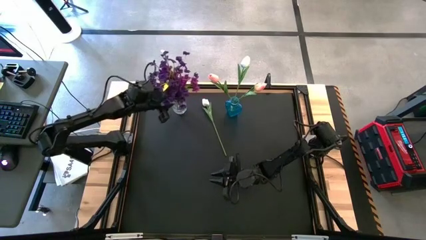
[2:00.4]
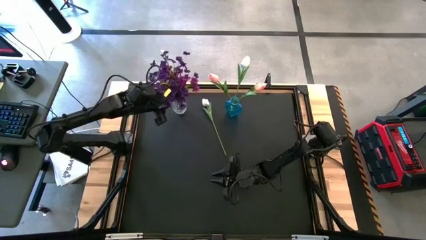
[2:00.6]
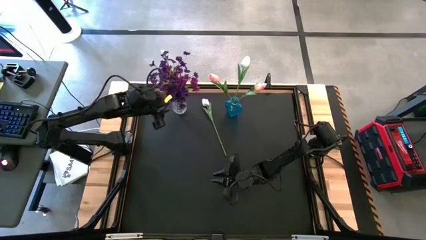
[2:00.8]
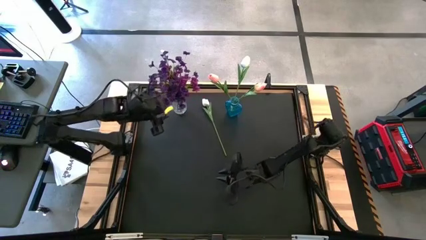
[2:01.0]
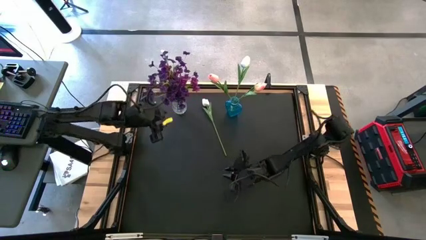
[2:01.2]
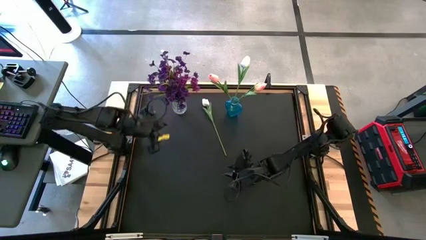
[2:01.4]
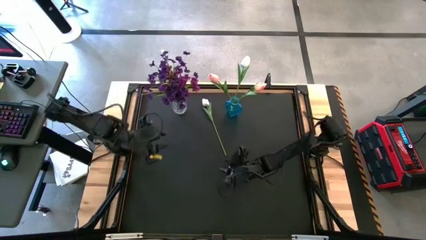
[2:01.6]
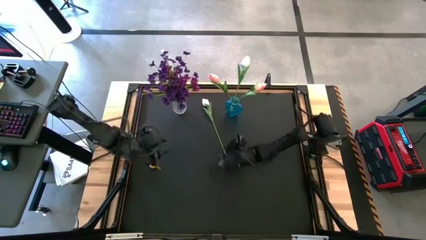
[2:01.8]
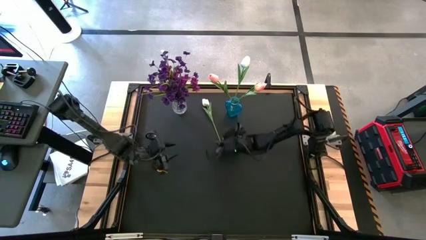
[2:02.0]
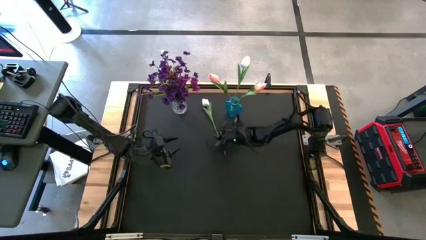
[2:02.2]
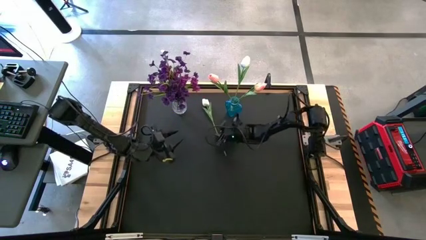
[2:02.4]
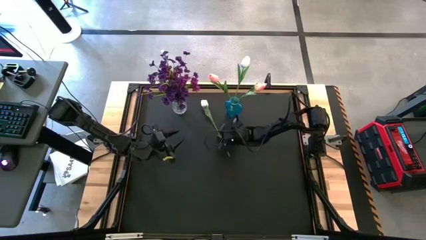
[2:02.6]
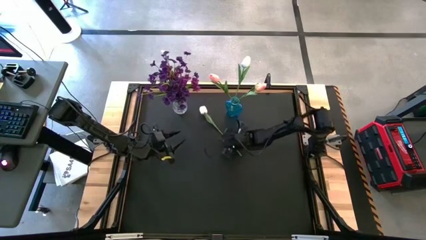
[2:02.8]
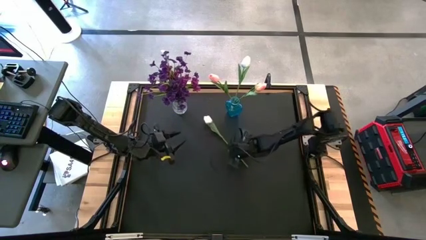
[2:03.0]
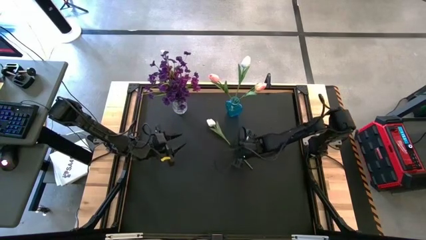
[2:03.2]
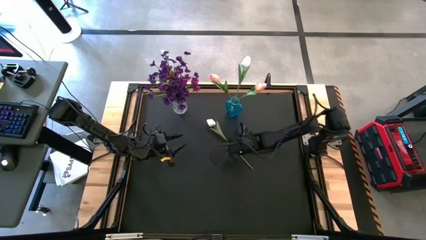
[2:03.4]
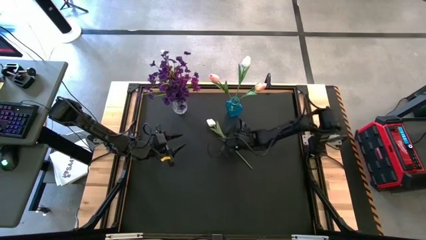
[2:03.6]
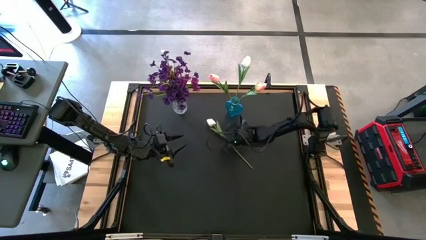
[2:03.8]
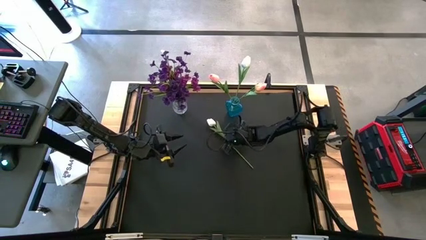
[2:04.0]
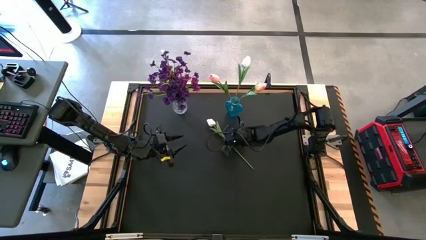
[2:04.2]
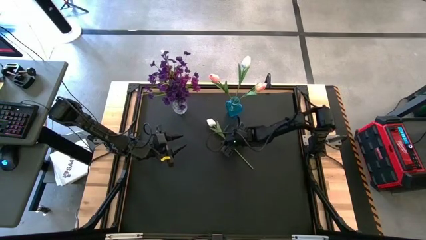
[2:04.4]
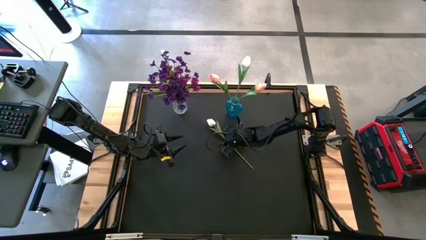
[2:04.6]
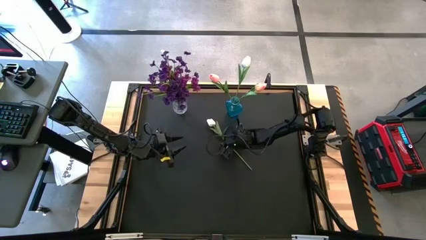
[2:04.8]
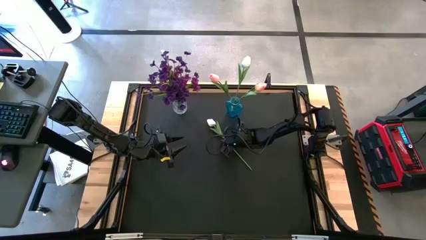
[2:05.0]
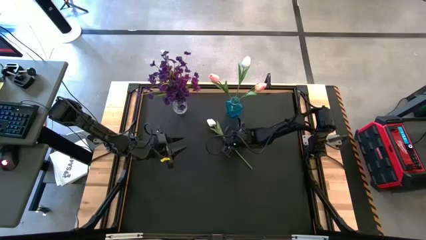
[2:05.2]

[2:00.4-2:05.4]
Task: Sort flowers into vase by color
Put the white flower into the blue vase

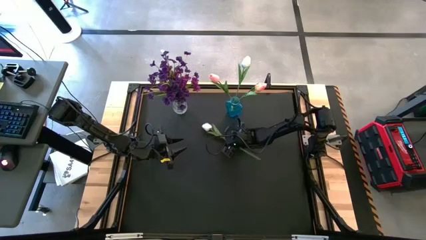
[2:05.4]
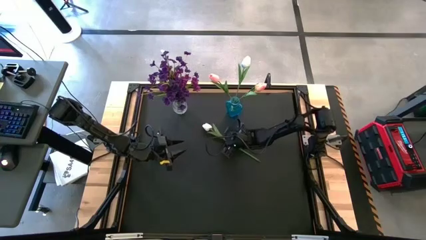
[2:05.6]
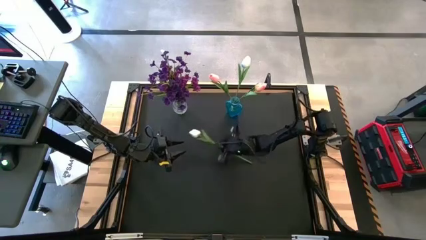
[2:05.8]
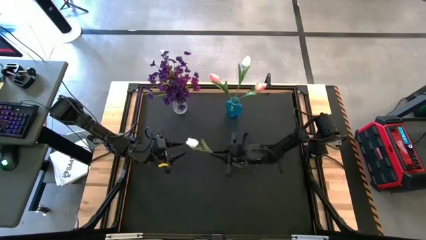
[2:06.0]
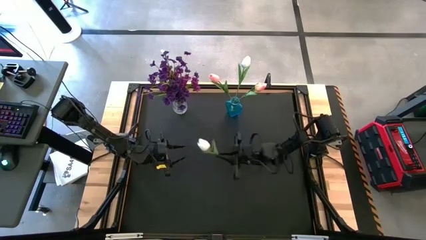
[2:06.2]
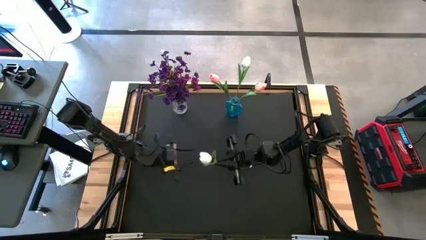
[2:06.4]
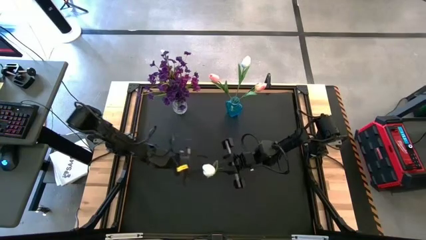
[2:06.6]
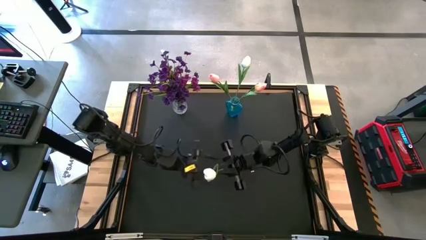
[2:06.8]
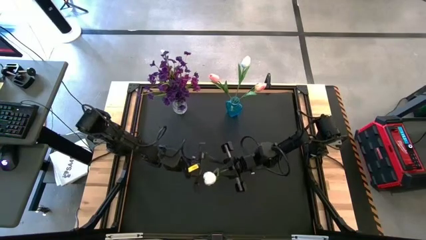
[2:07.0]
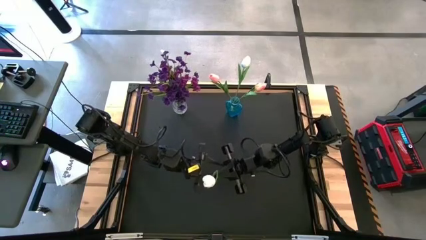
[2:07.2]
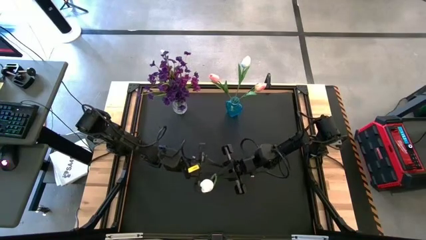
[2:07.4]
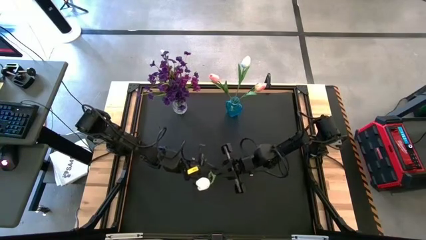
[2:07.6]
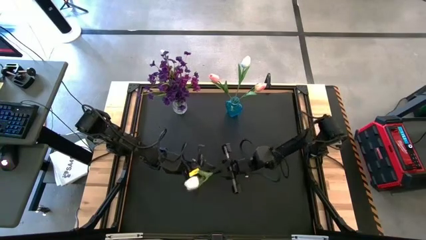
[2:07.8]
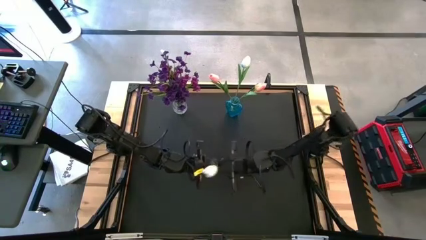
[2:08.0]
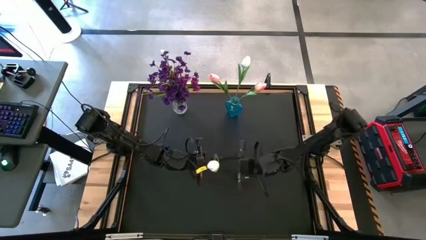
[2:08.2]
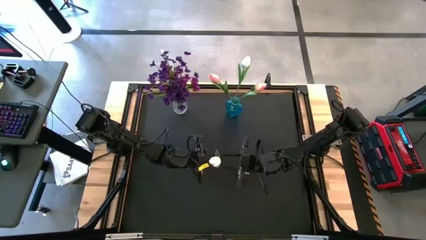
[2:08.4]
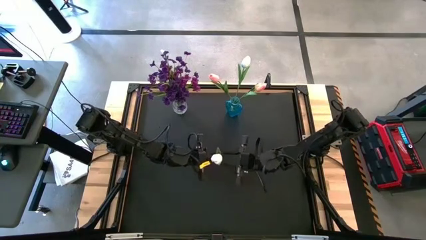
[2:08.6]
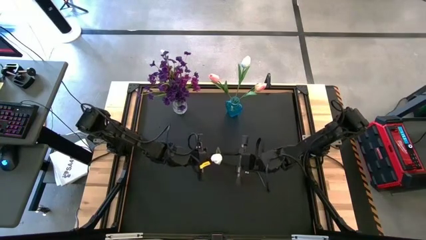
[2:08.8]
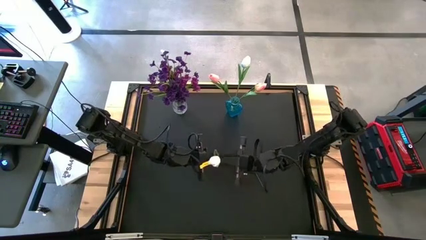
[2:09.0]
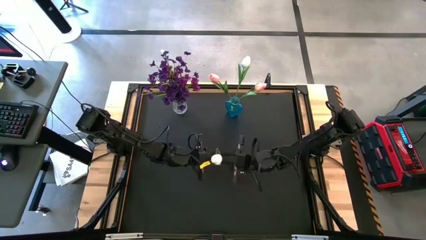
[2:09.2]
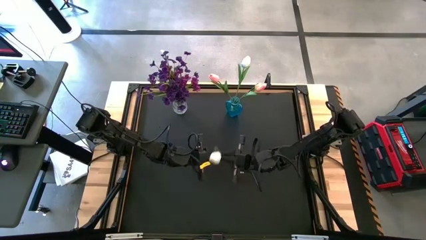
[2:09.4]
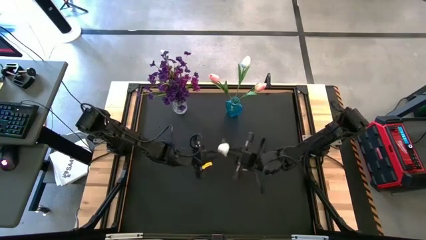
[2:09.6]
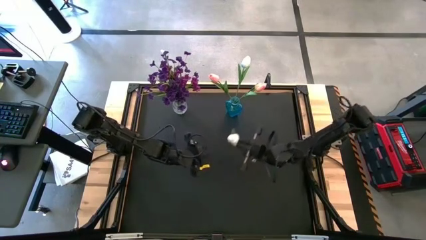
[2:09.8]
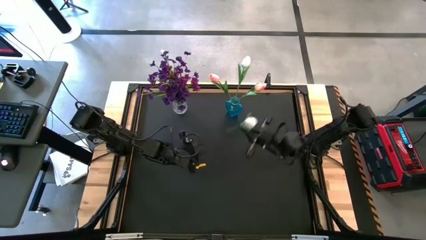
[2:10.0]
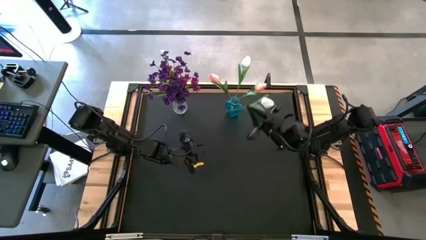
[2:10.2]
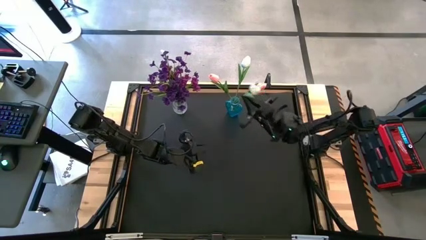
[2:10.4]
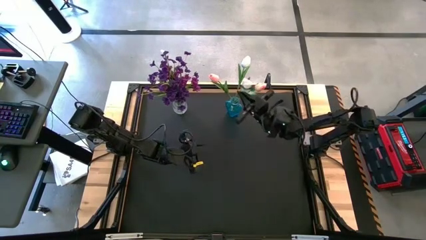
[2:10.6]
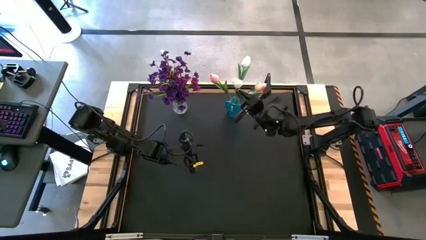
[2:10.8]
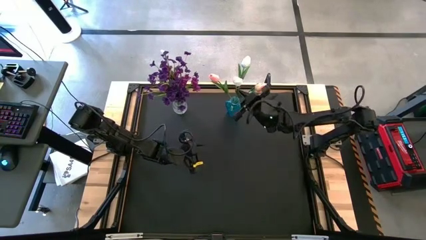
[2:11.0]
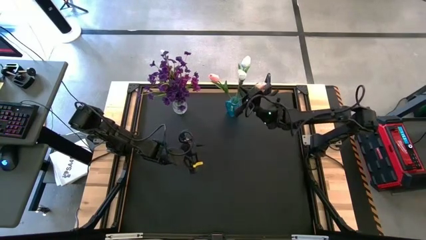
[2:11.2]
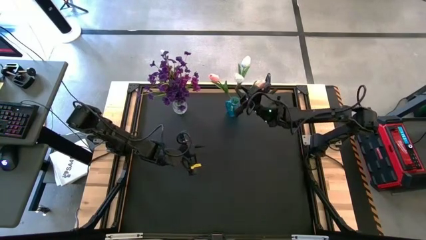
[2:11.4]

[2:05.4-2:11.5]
Put the white flower into the blue vase

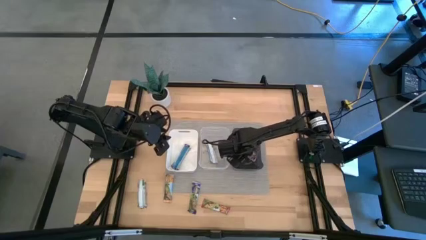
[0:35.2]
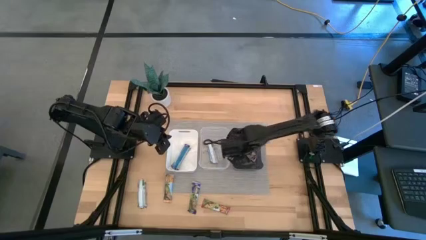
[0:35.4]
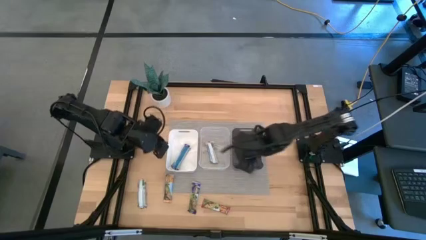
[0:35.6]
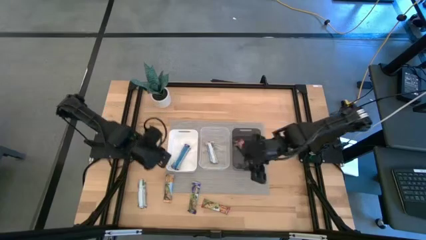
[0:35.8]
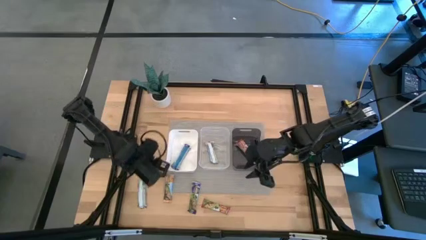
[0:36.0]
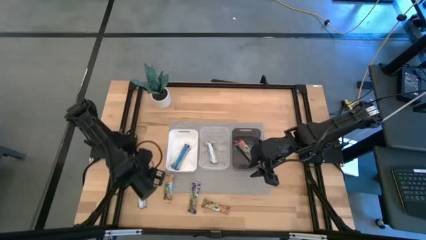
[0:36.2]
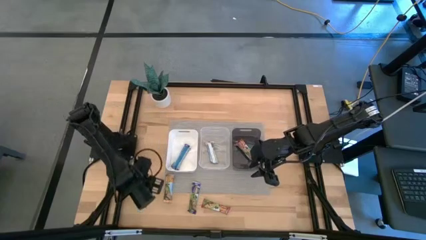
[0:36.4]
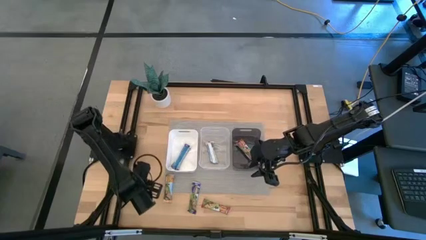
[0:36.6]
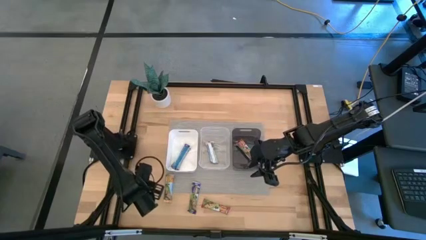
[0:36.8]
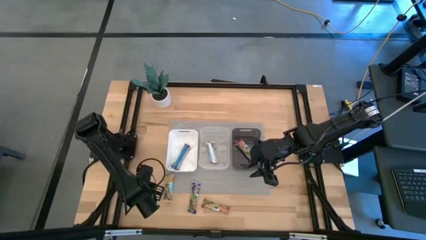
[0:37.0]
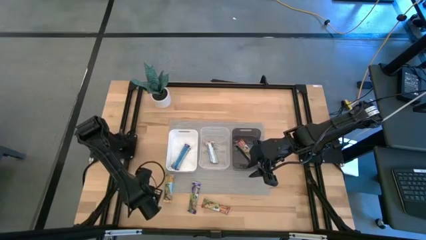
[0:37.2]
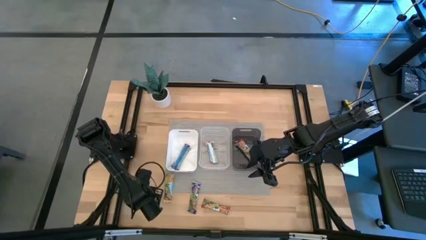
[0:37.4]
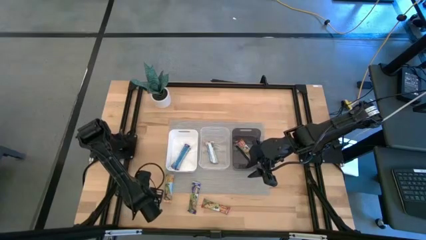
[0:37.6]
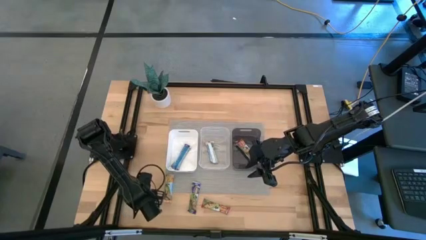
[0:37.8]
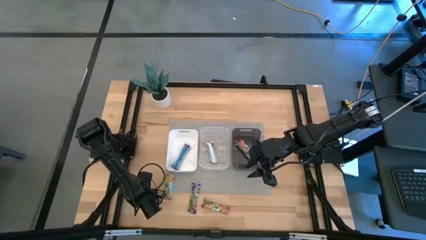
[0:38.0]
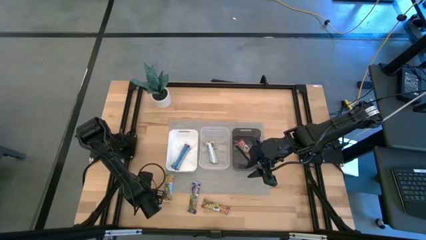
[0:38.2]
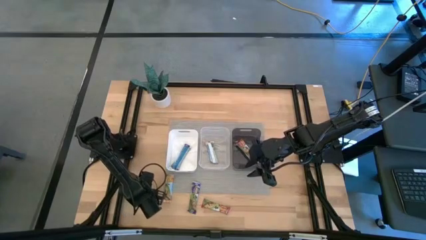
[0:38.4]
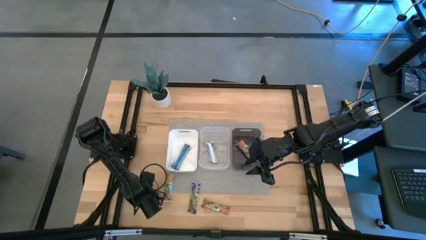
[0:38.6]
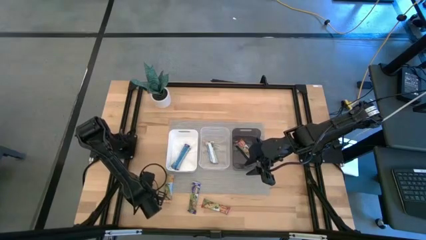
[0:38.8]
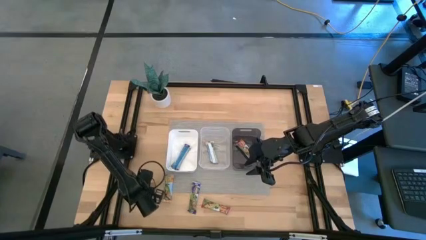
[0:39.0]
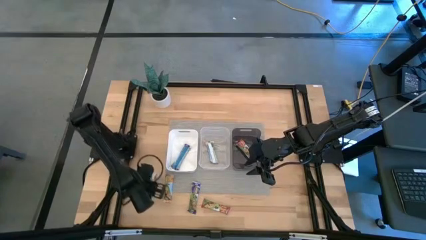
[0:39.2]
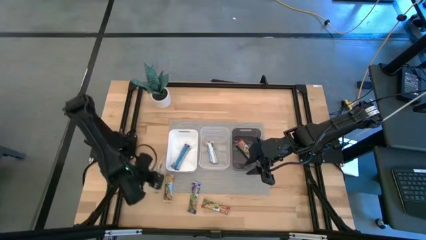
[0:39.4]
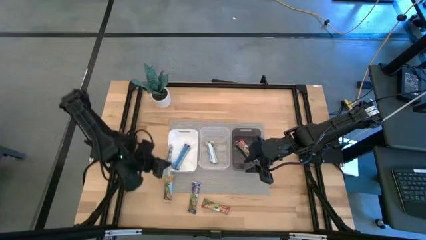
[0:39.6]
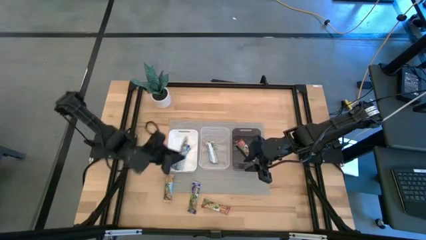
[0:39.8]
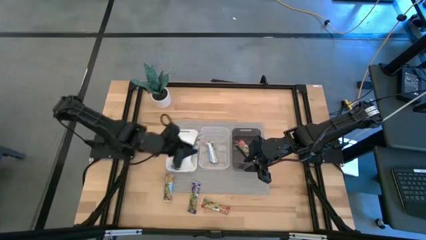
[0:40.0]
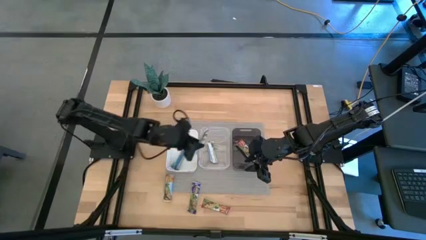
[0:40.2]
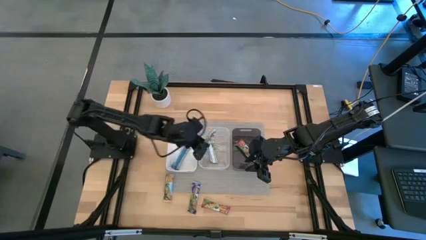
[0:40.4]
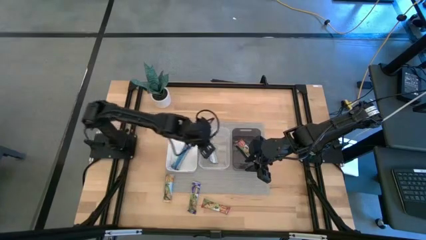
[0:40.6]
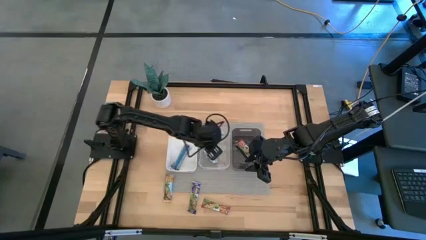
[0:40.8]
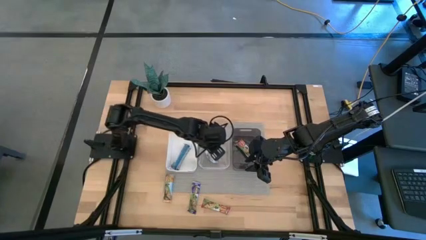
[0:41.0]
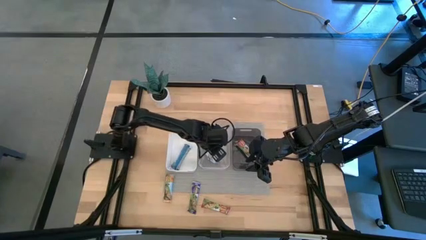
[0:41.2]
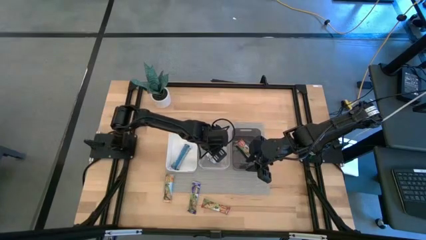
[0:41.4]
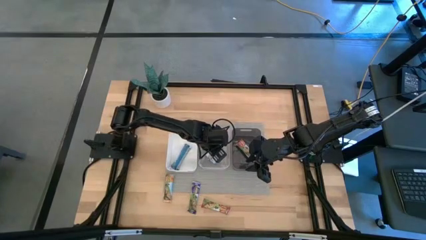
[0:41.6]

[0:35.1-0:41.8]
Task: Pick and place Granola Bars by type
Put the left orange granola bar into the transparent bin
